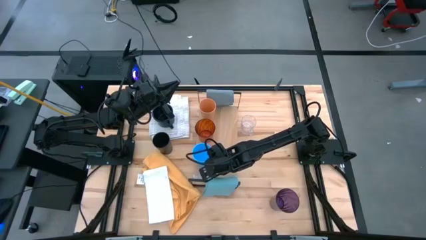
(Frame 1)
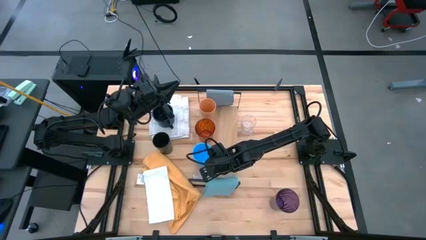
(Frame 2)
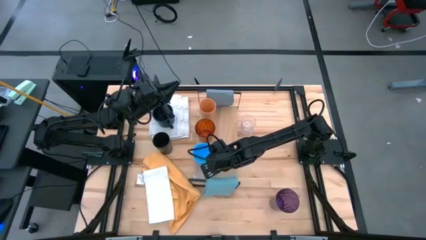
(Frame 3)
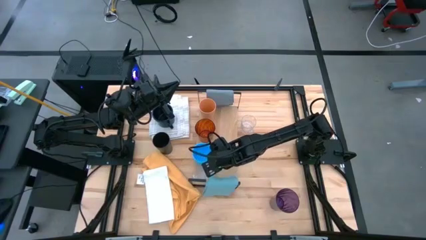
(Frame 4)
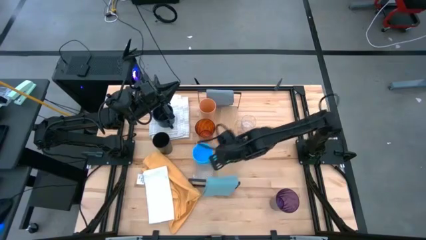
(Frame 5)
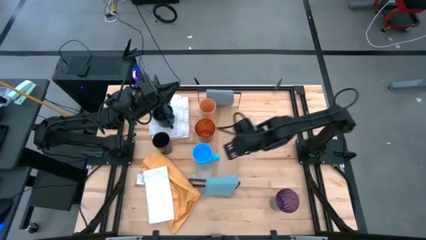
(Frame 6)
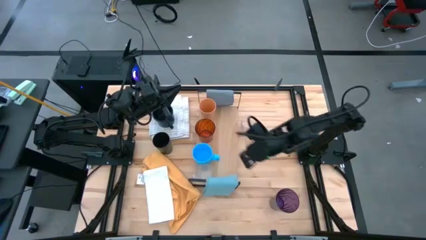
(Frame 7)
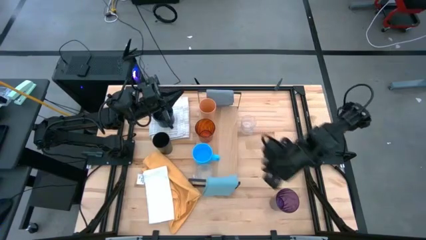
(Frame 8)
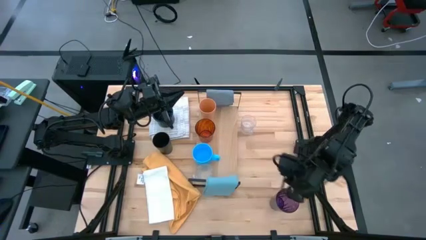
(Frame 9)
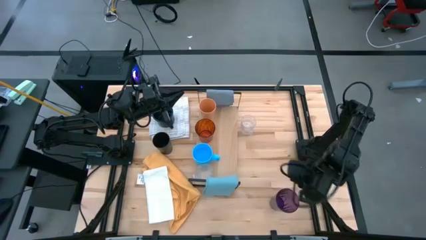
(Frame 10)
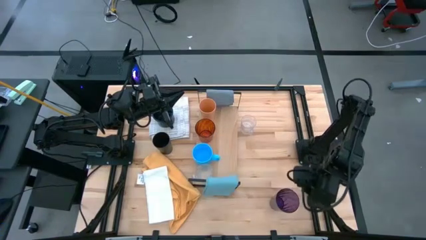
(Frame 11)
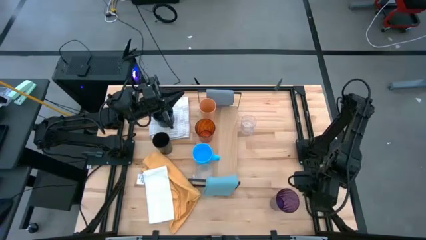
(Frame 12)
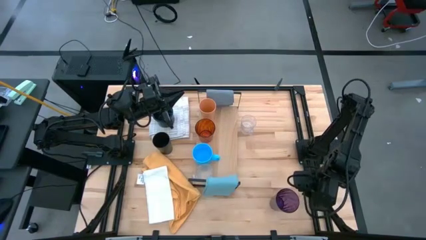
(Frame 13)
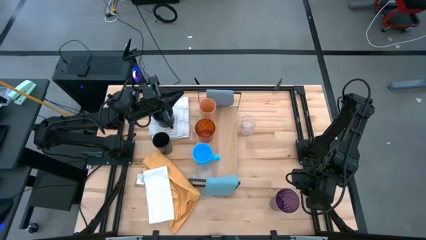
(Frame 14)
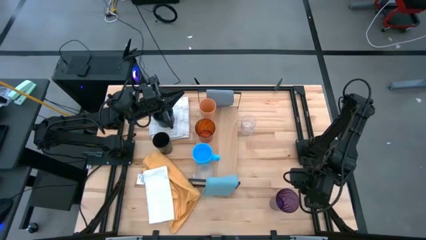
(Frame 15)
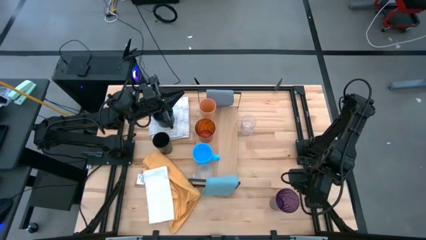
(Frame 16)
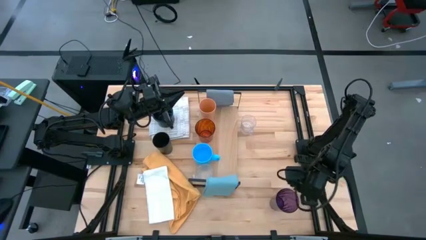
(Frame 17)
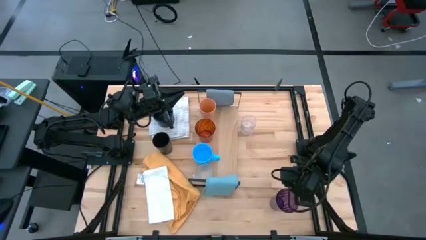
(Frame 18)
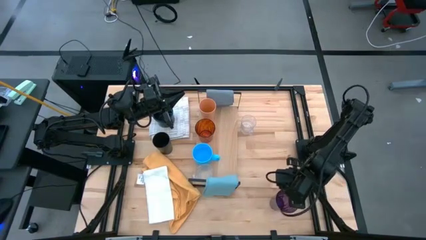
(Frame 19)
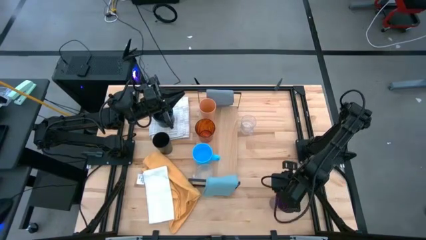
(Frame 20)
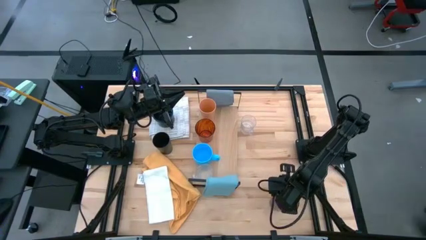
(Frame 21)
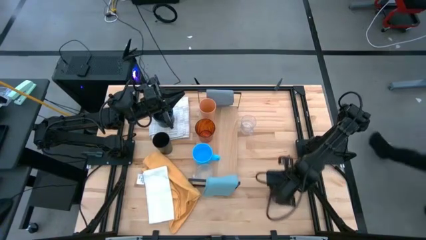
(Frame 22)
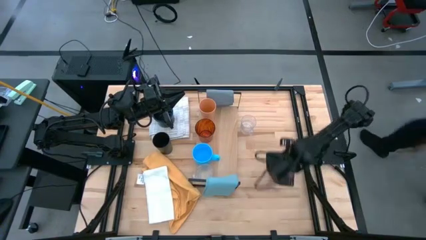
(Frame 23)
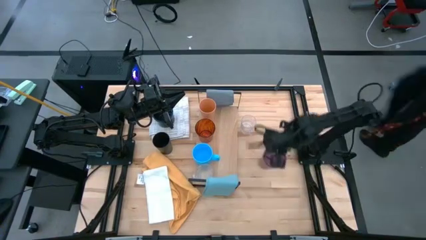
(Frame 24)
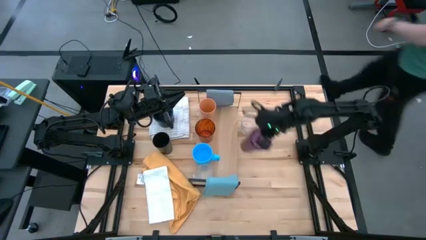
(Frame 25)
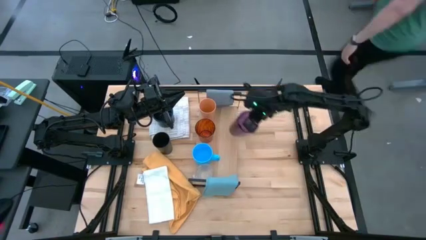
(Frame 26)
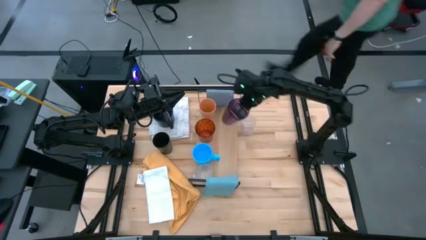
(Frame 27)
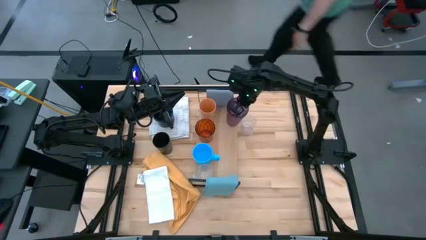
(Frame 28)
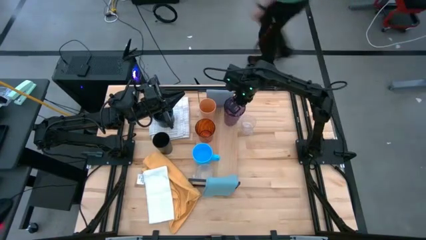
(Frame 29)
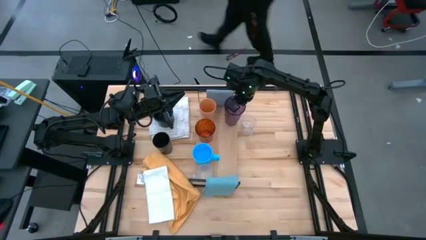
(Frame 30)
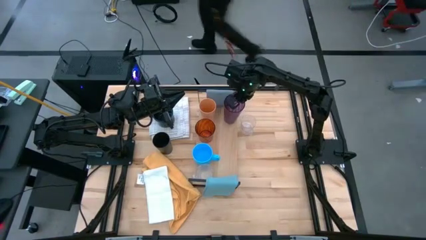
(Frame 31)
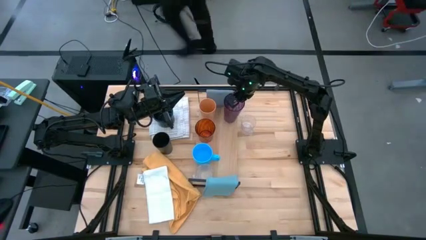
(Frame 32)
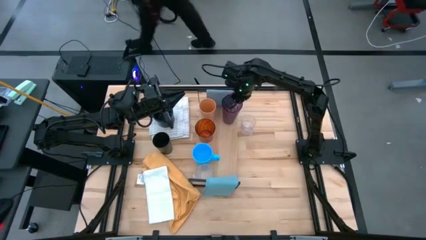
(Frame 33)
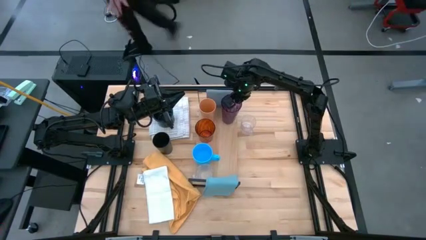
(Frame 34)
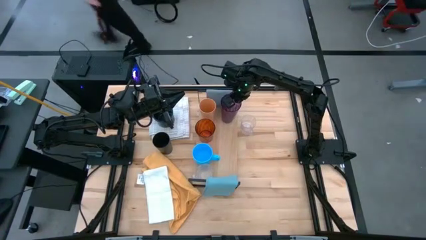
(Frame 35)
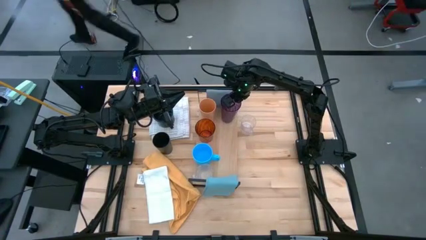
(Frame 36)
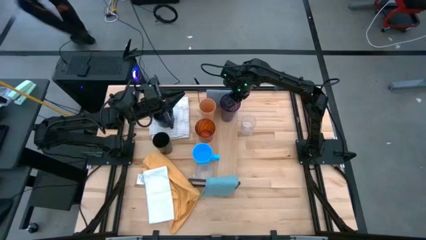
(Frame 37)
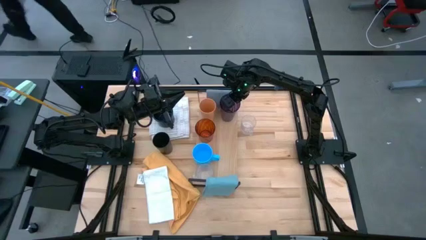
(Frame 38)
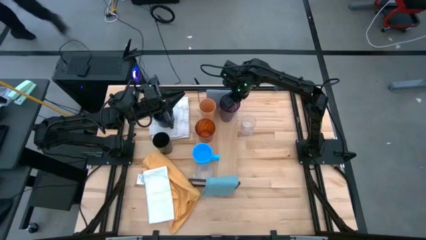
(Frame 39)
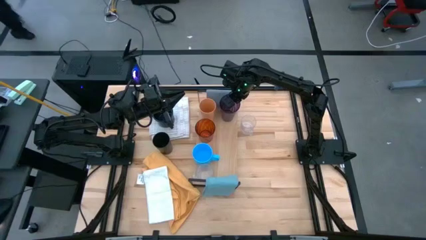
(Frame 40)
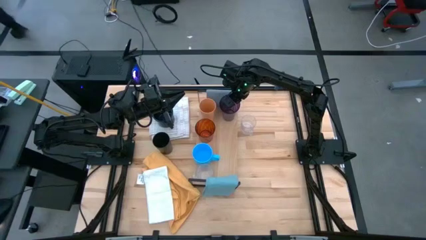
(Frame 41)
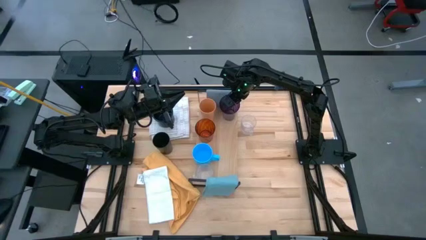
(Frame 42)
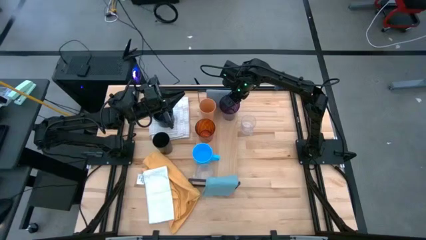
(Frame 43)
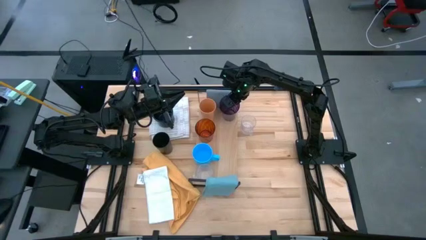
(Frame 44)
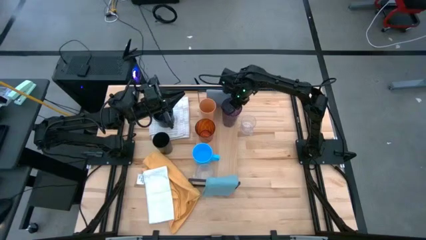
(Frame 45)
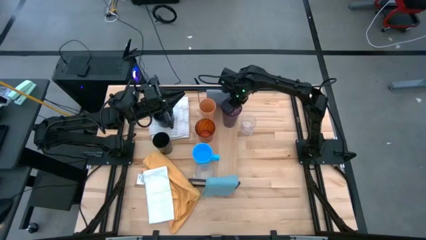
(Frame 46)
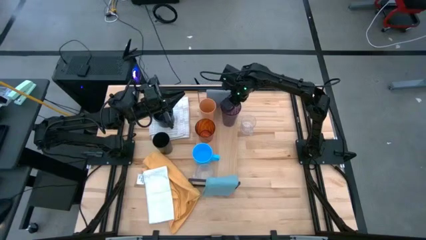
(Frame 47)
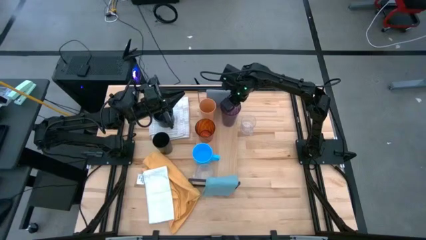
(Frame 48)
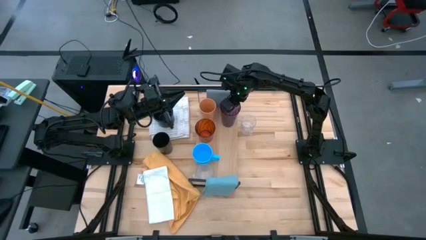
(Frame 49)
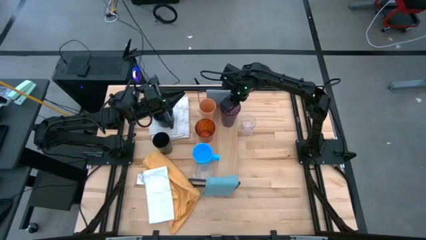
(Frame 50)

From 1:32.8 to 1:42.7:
Task: Stack small to large cups/mugs on shelf
Put the purple cup on the shelf

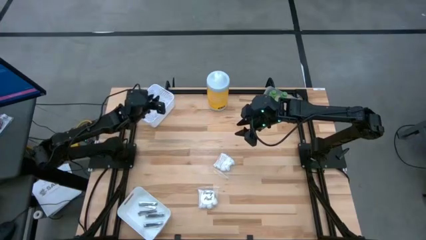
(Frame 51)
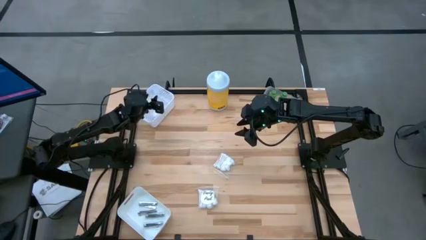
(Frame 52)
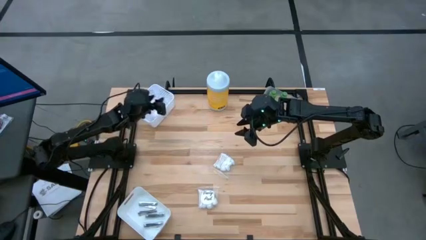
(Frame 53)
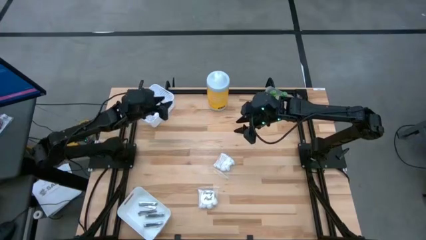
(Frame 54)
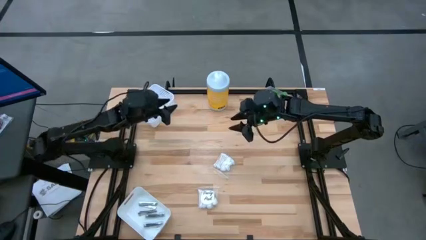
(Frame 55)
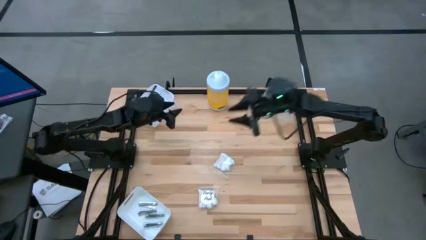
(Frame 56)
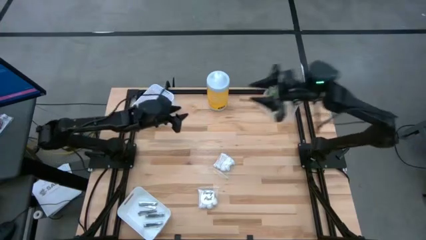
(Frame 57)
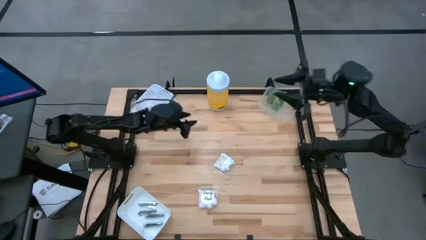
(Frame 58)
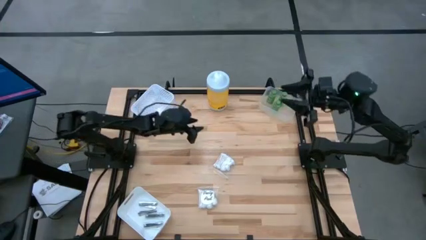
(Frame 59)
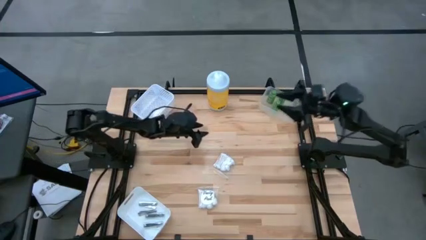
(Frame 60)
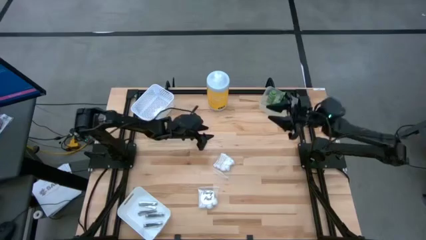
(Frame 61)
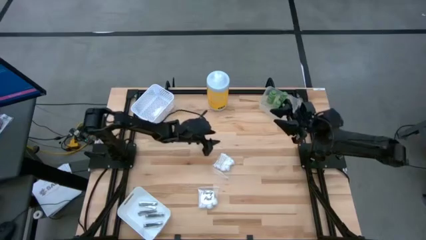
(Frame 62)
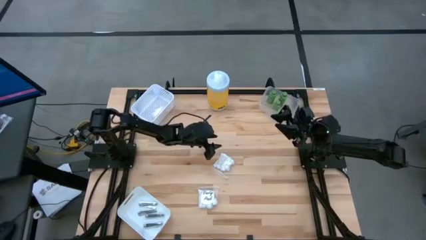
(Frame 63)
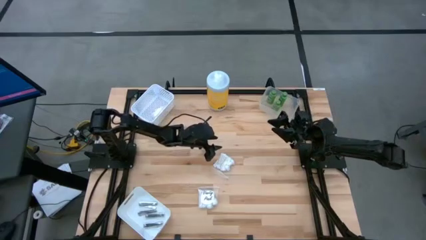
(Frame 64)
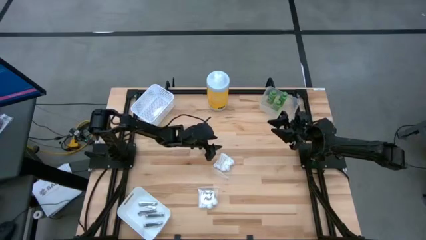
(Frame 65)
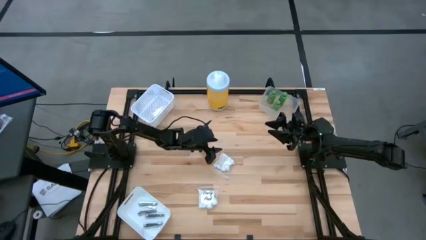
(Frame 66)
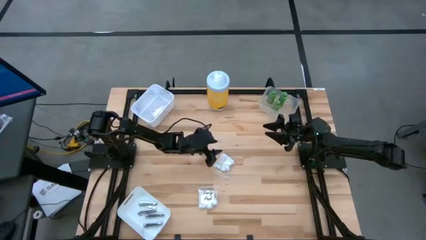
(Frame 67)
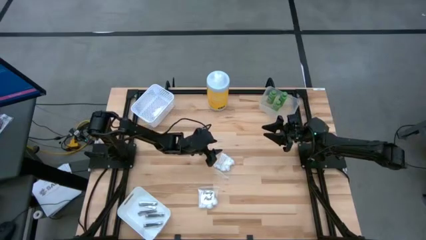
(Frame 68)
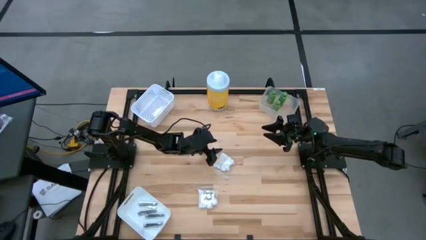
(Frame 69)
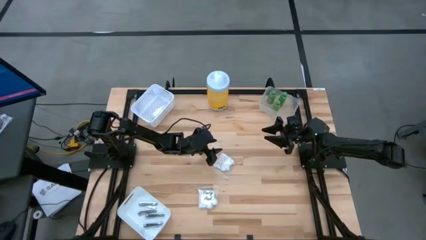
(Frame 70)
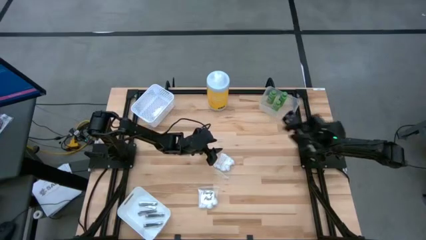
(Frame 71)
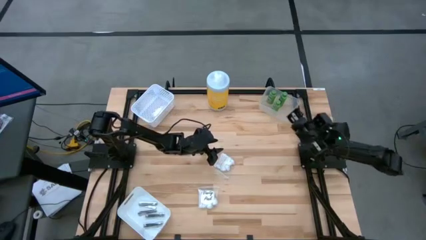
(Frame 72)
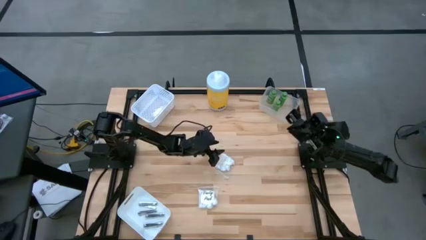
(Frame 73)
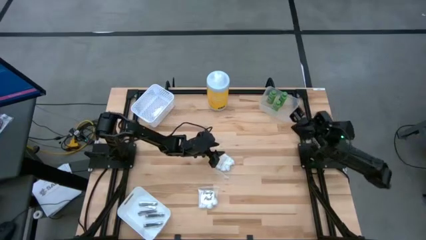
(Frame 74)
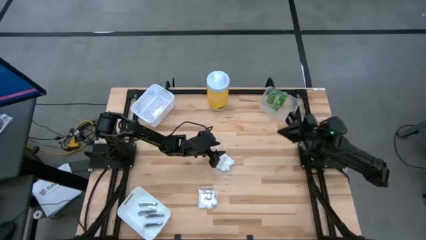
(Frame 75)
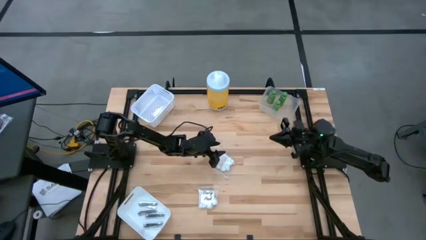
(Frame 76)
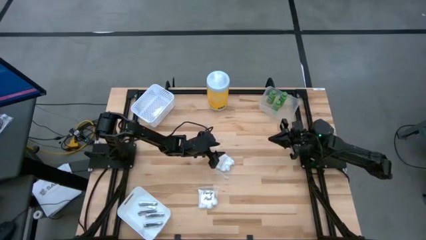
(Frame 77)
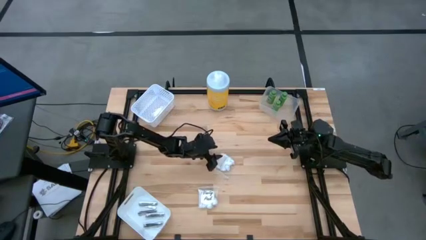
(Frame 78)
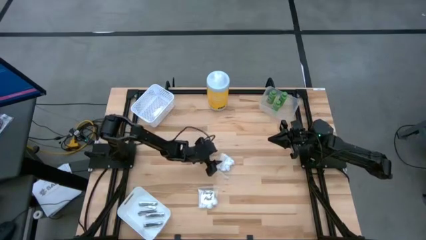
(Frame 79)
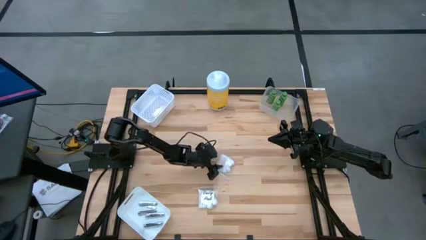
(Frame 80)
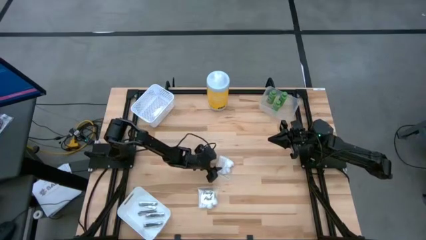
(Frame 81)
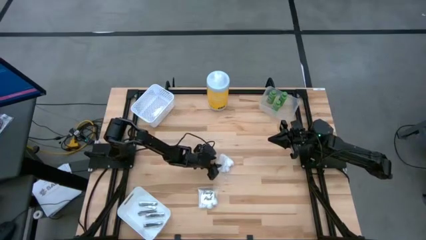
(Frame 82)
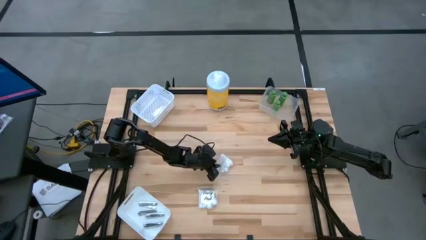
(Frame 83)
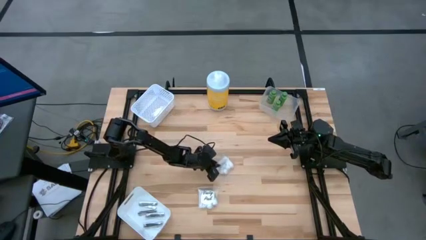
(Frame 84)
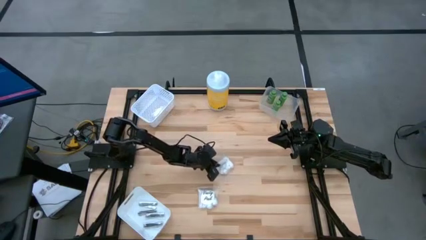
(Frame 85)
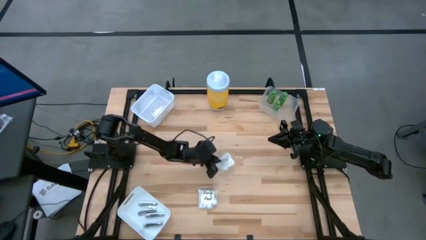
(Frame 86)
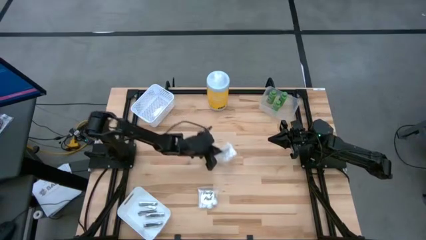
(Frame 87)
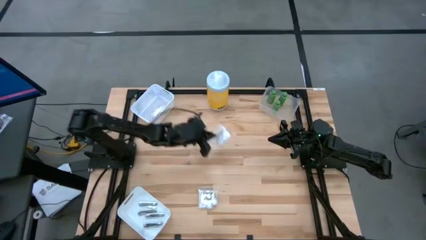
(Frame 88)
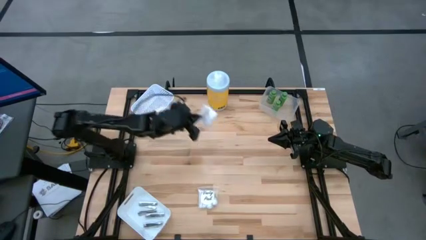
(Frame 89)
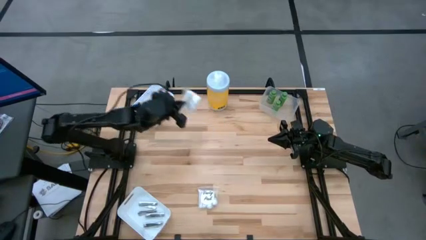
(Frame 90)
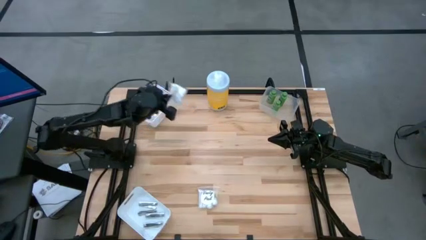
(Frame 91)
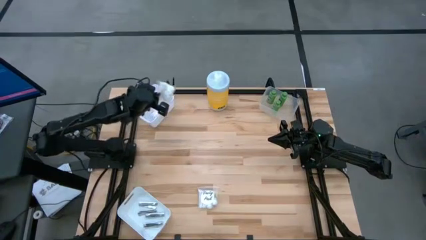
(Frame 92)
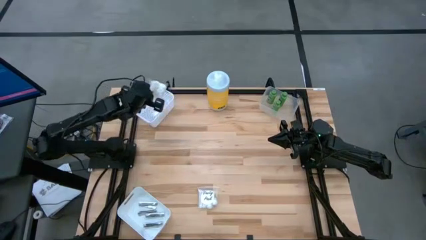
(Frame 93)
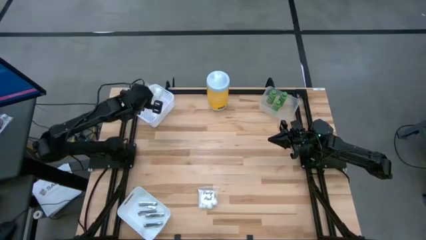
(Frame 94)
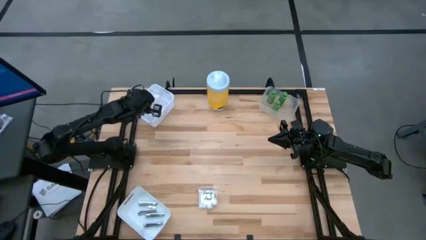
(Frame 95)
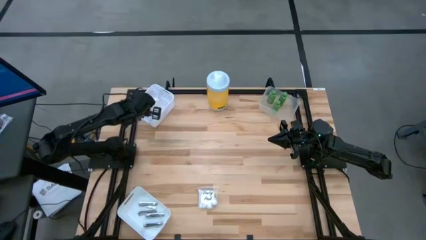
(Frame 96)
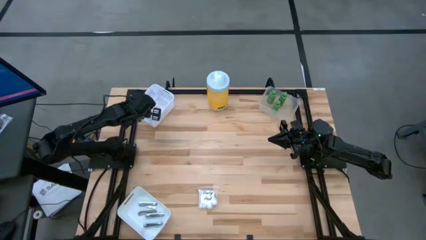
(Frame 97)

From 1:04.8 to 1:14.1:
Task: Pick & Place Travel size toiletries
Put the white cotton pack into the white basket
